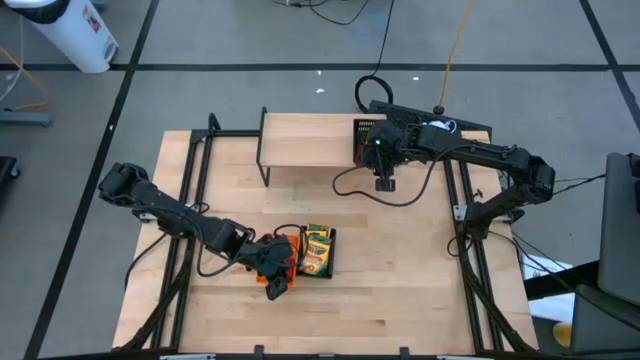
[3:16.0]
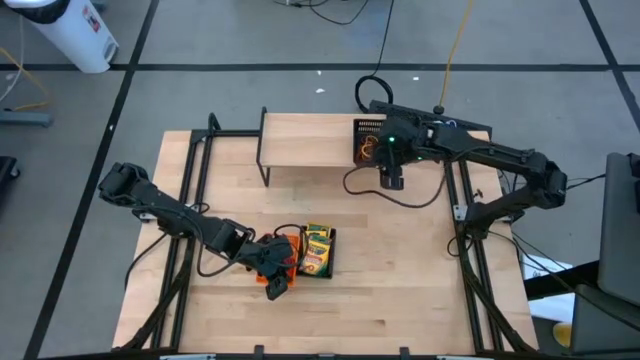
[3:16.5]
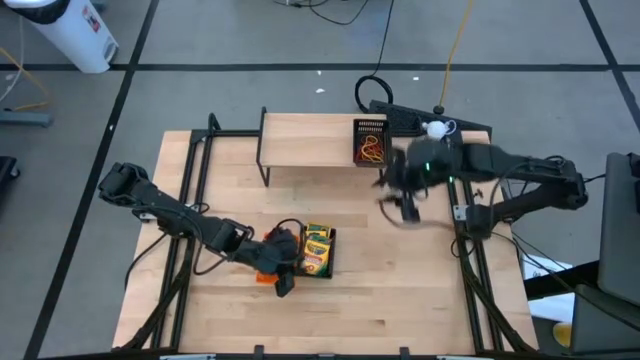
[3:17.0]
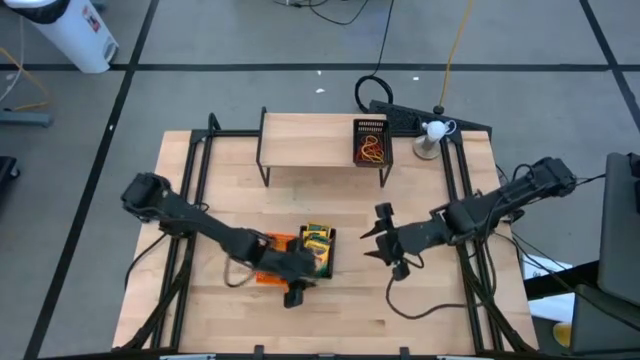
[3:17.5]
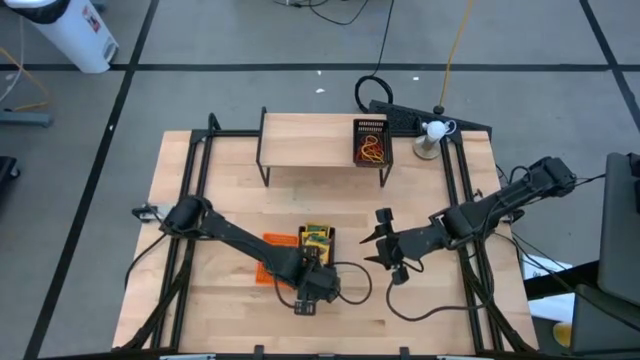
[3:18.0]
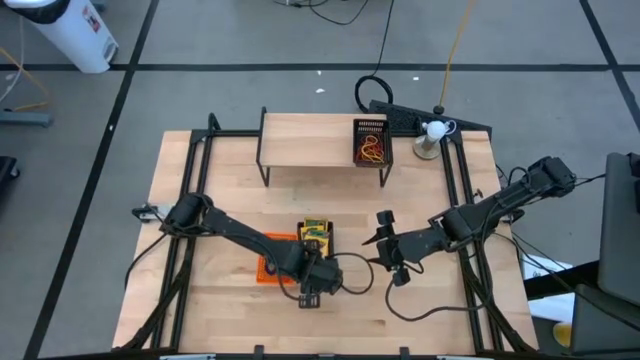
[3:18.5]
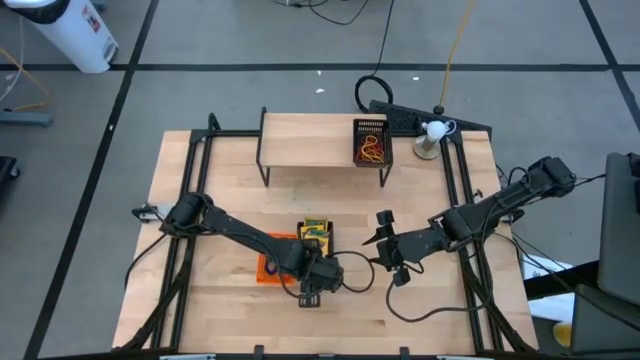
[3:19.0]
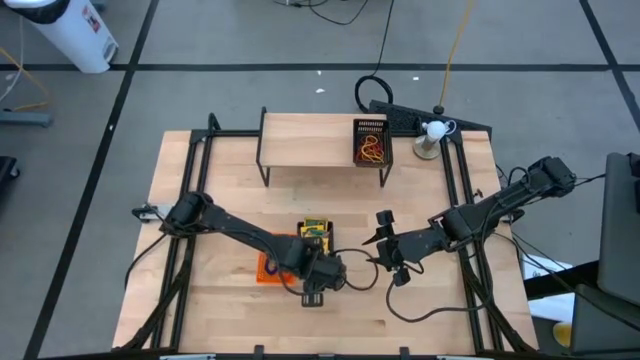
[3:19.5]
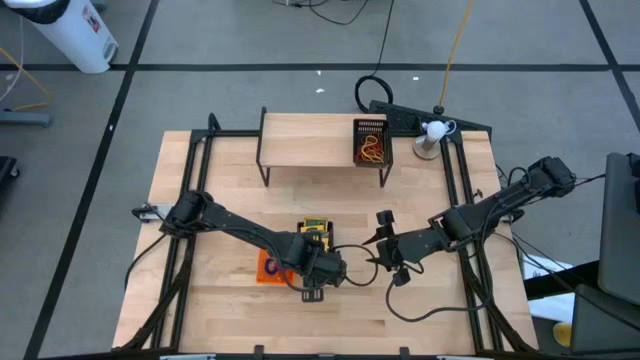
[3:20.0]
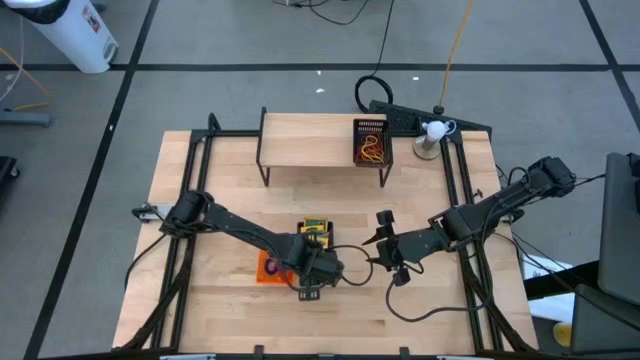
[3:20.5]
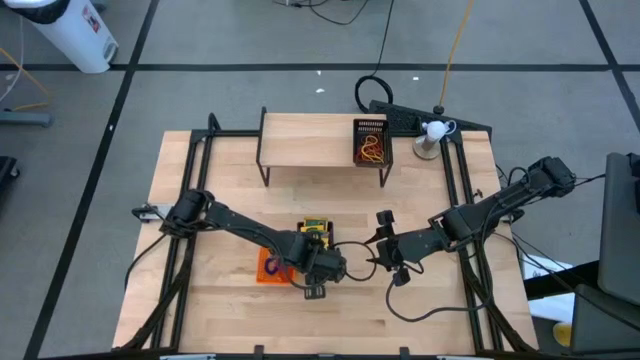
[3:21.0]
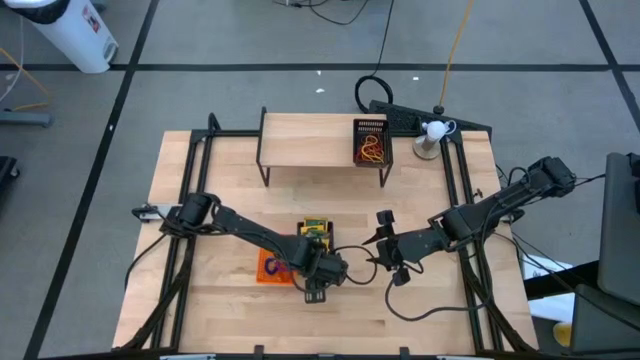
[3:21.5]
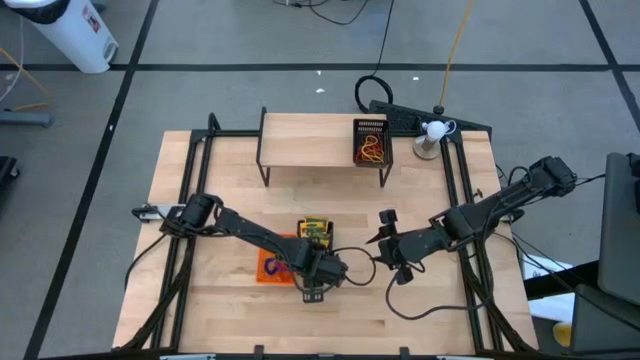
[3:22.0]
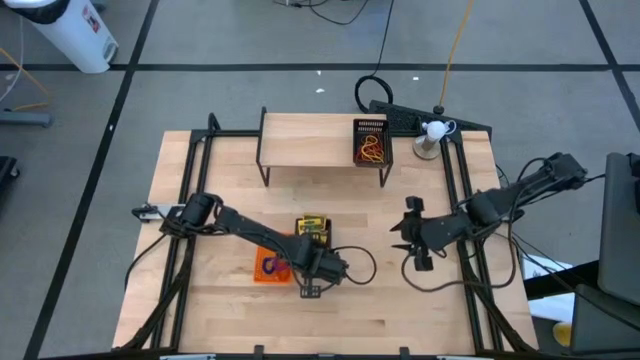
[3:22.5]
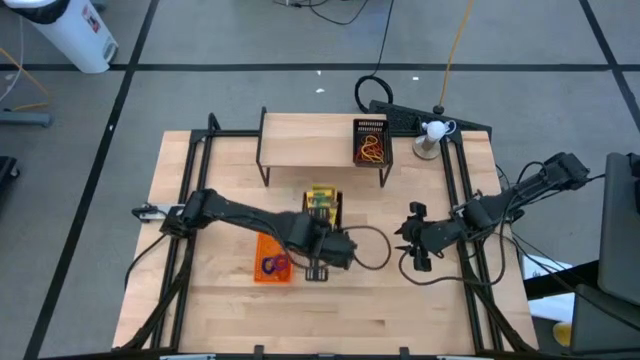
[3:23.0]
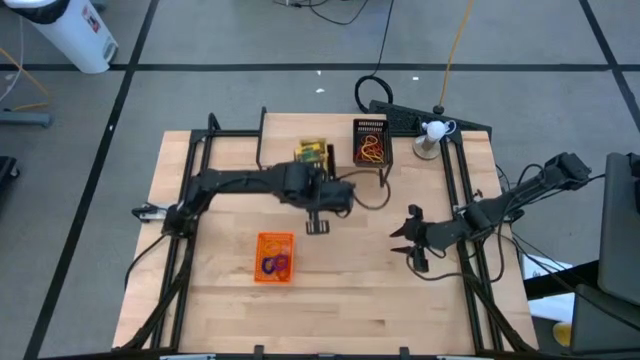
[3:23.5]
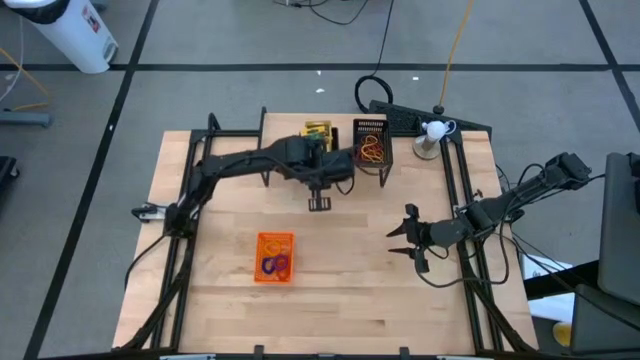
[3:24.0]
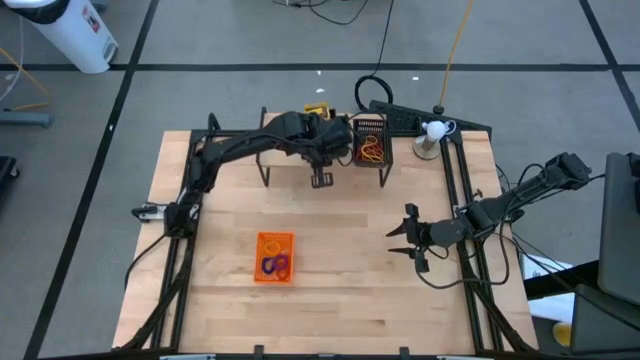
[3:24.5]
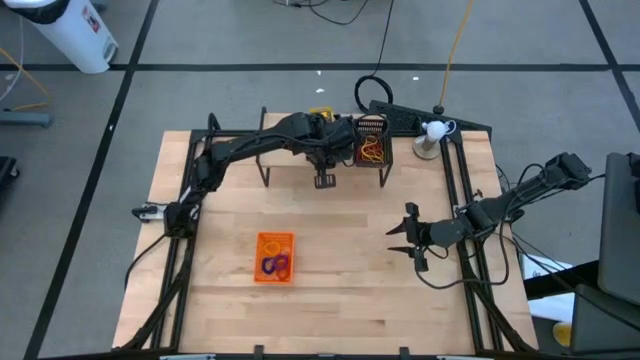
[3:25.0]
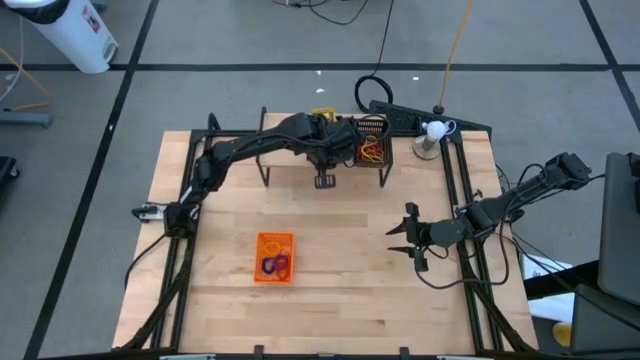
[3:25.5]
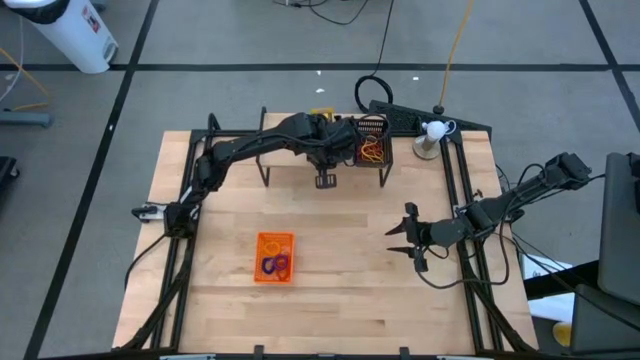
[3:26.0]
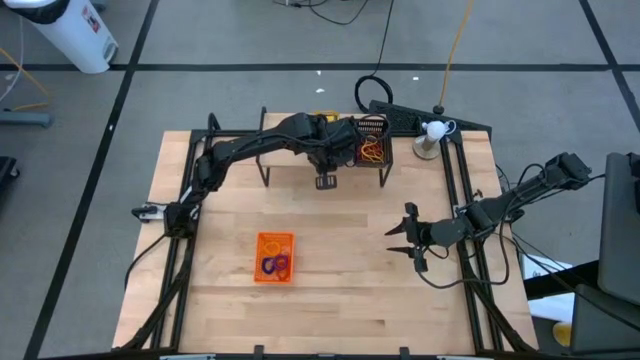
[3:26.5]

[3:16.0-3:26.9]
Task: Pick & Place Office Desk Supplies
Put the black bin on the shelf

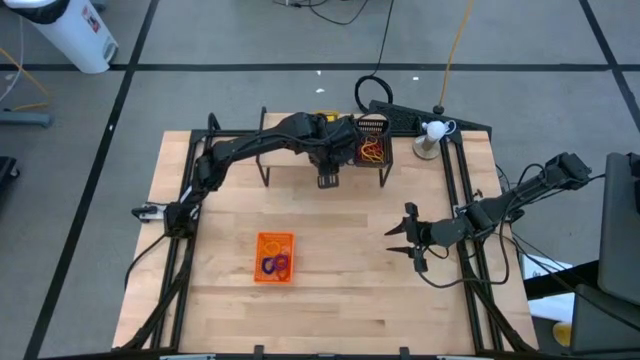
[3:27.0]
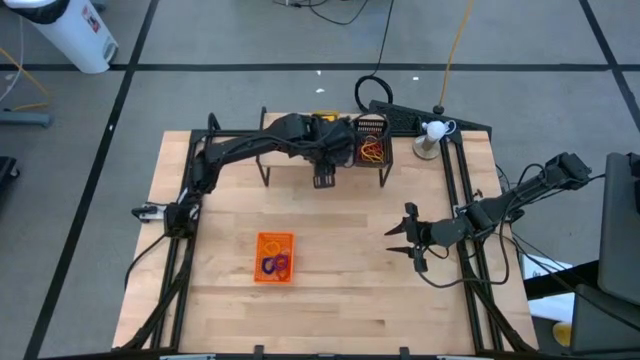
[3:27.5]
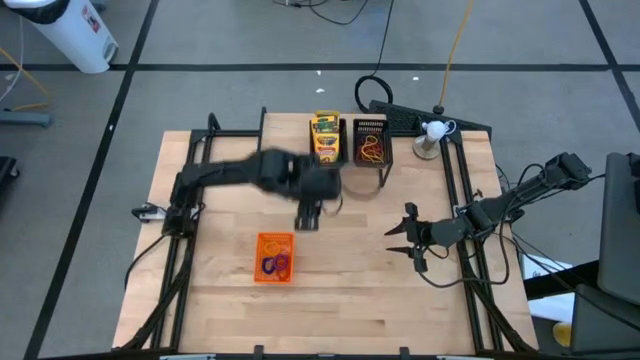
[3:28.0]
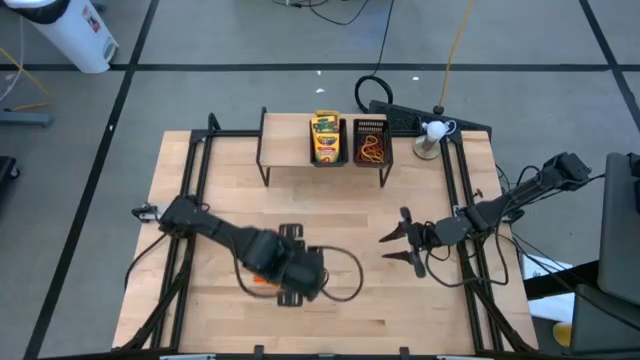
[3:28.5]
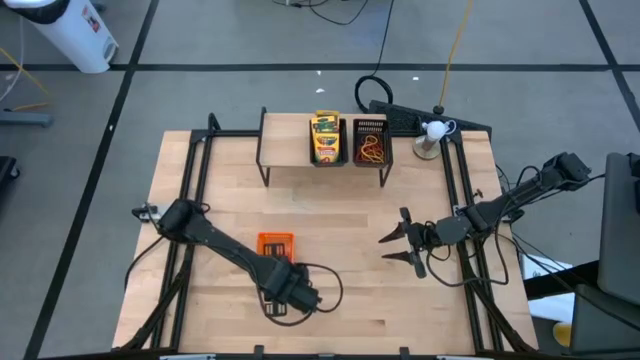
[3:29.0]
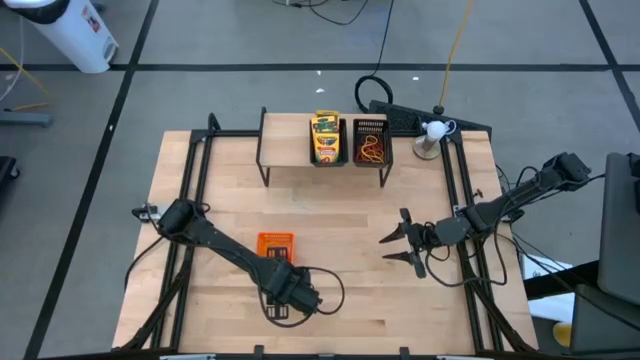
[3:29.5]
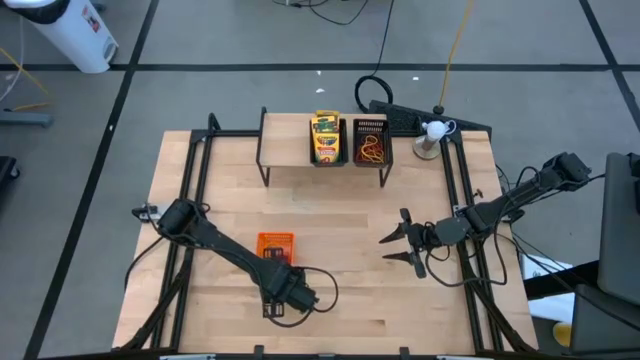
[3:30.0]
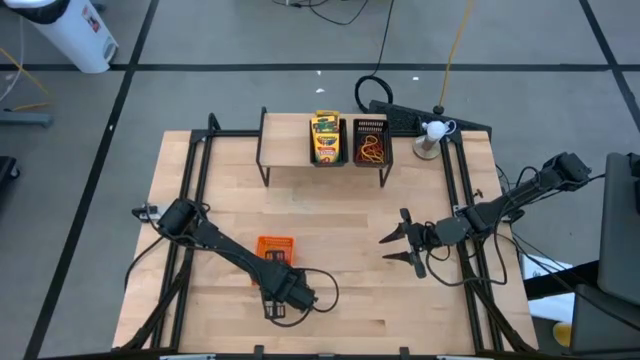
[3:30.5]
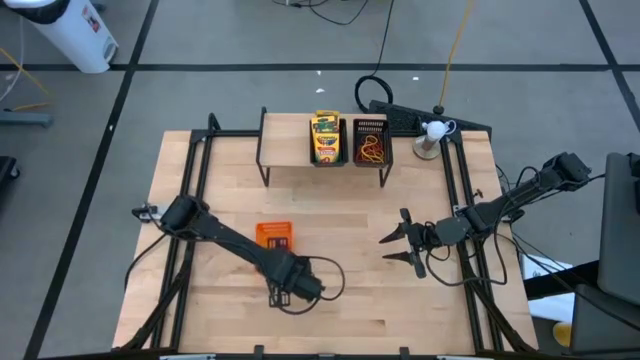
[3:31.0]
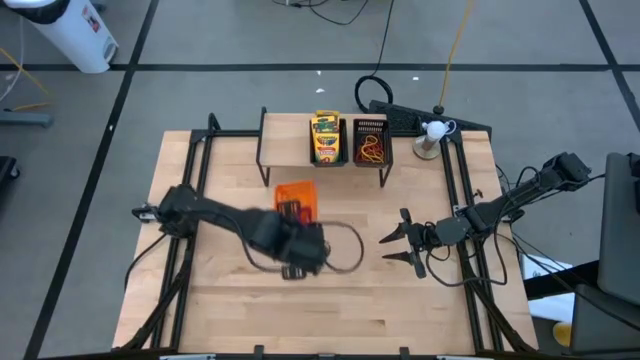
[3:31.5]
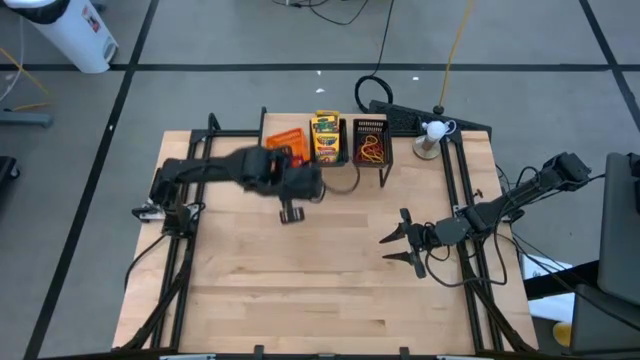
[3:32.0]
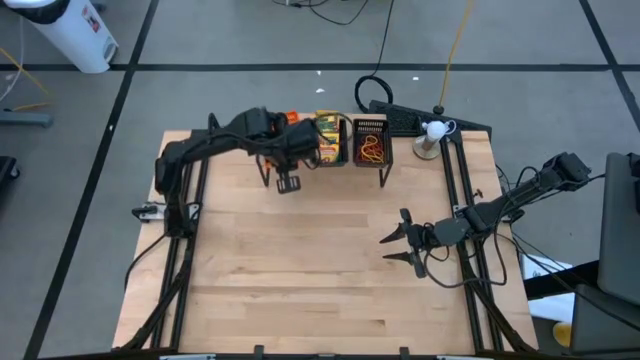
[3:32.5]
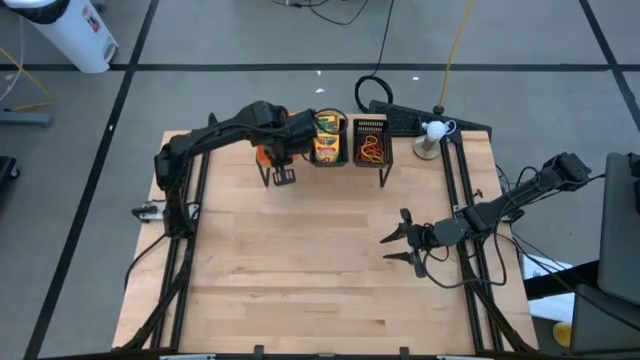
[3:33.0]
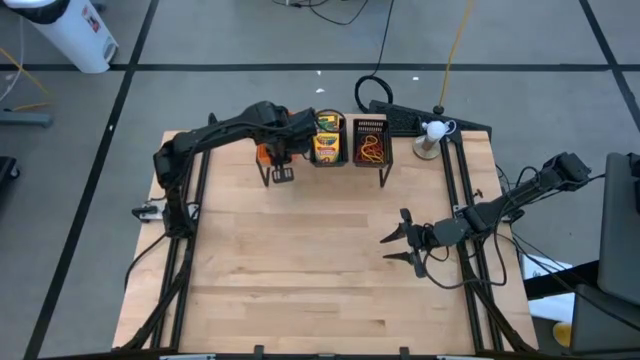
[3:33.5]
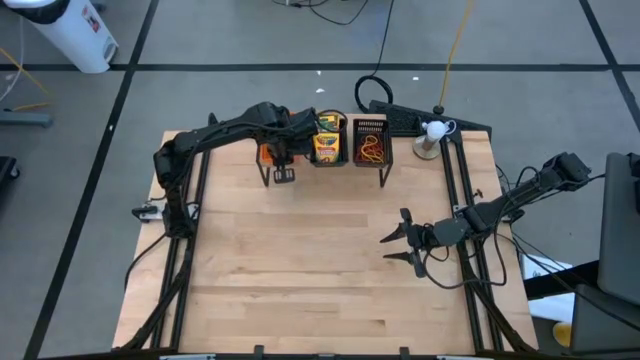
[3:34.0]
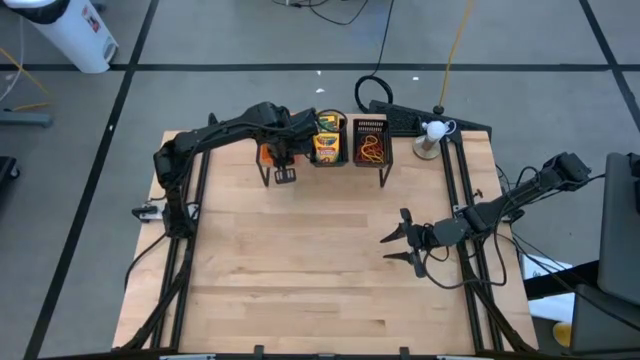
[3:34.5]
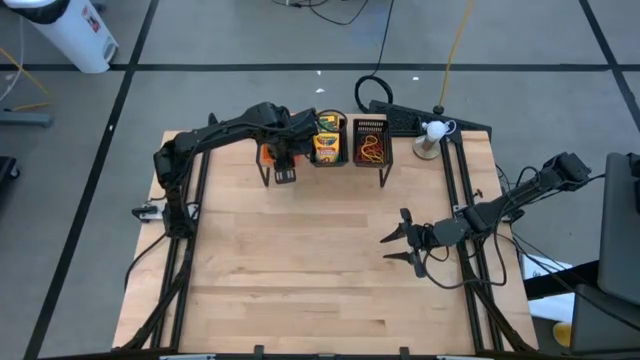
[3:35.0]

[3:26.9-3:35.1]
Put the orange bin on the shelf
